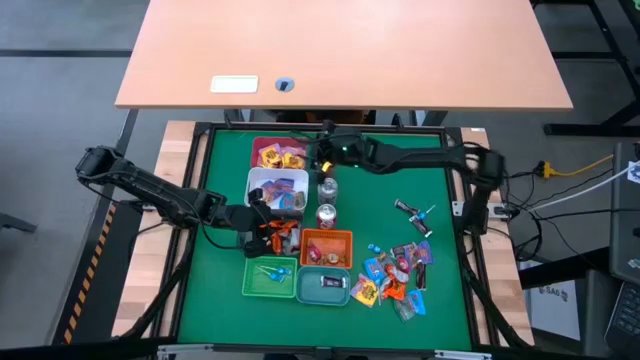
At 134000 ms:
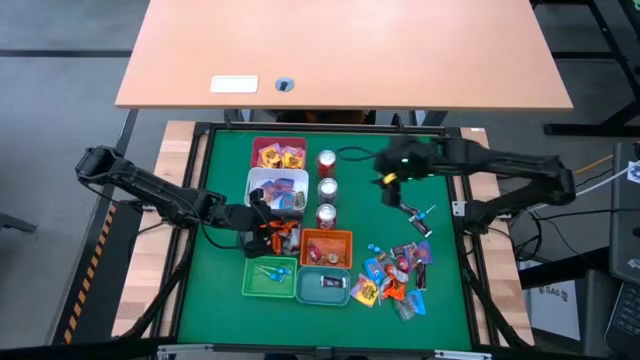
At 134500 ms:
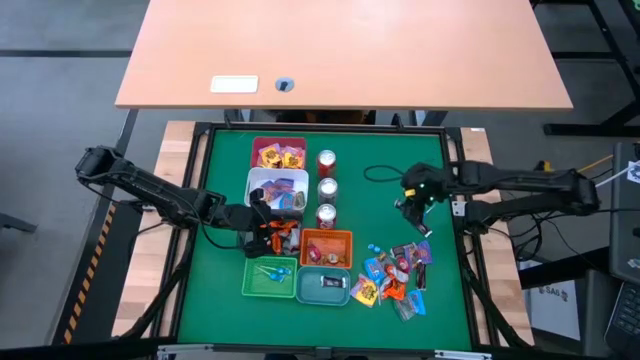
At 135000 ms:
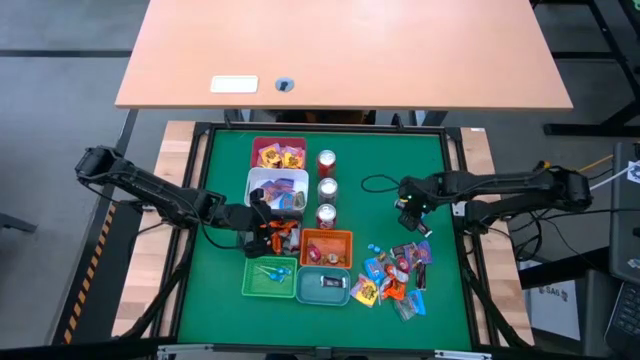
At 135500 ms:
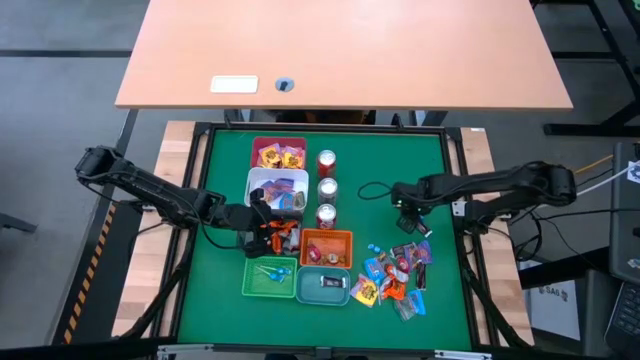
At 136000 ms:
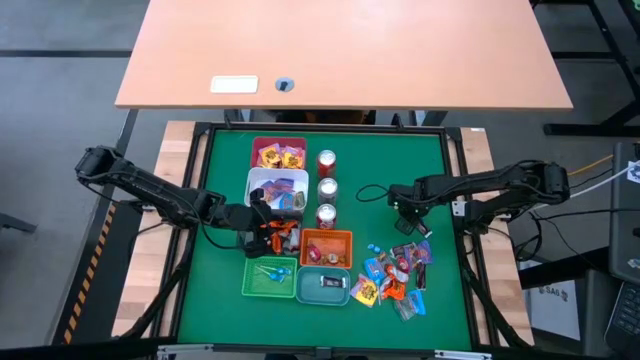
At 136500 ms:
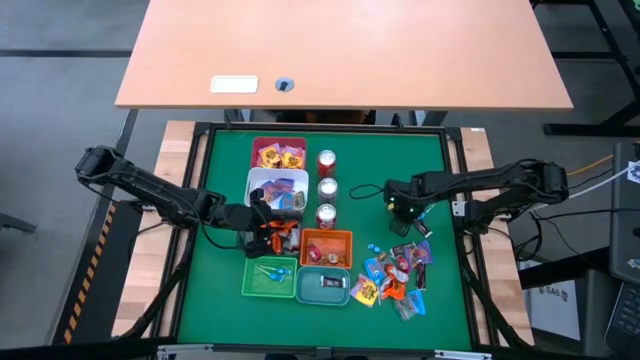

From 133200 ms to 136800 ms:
Task: Sort candy
Put the brown candy into the teal green bin

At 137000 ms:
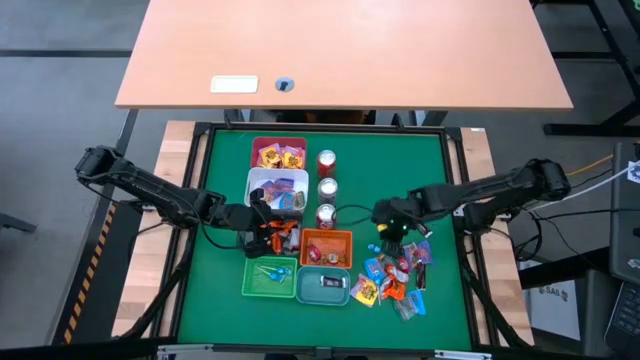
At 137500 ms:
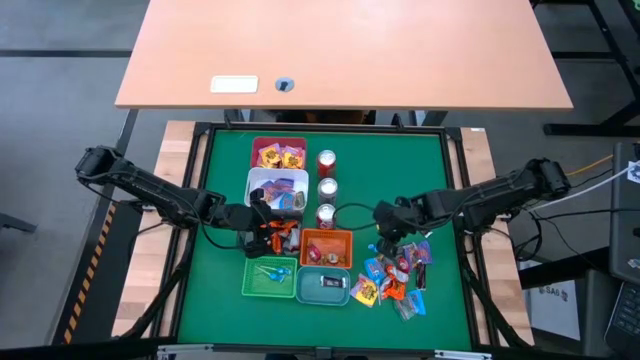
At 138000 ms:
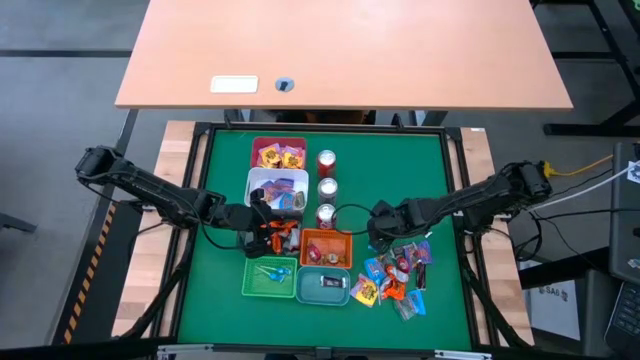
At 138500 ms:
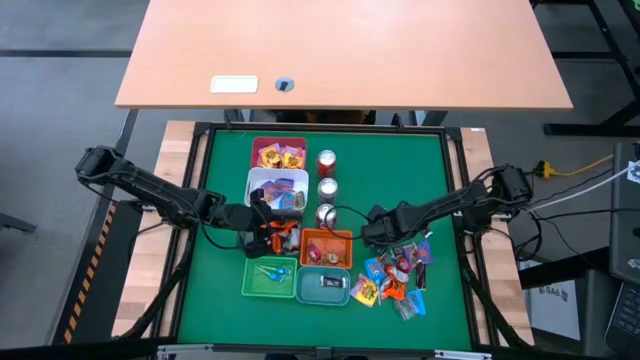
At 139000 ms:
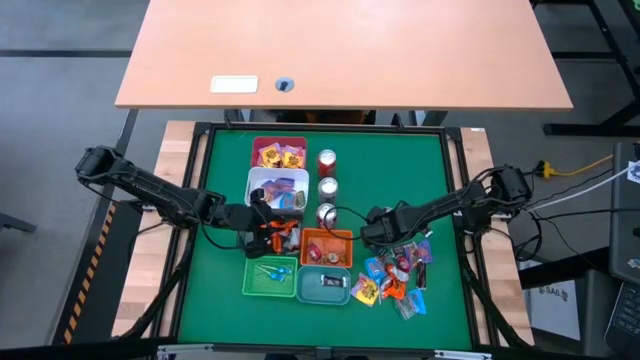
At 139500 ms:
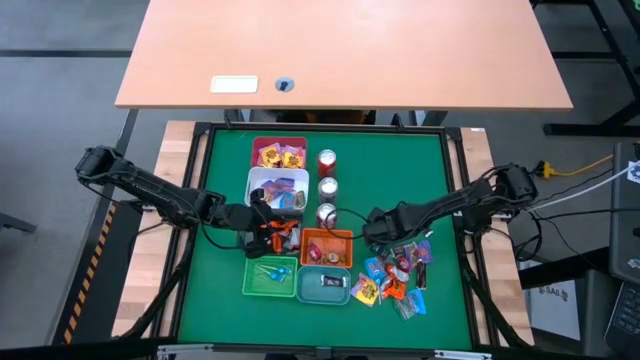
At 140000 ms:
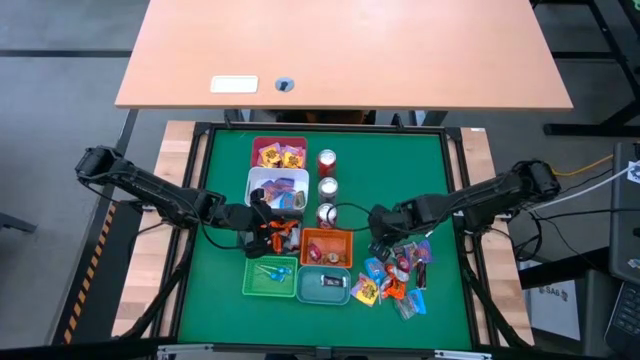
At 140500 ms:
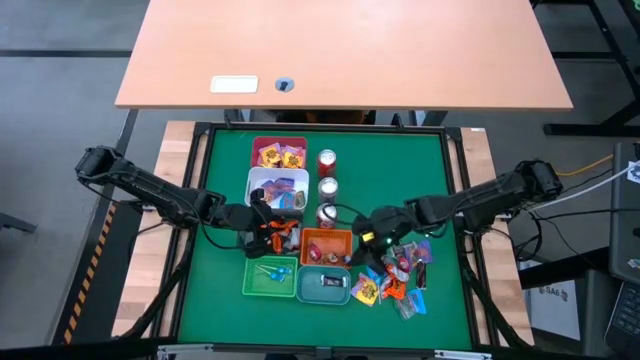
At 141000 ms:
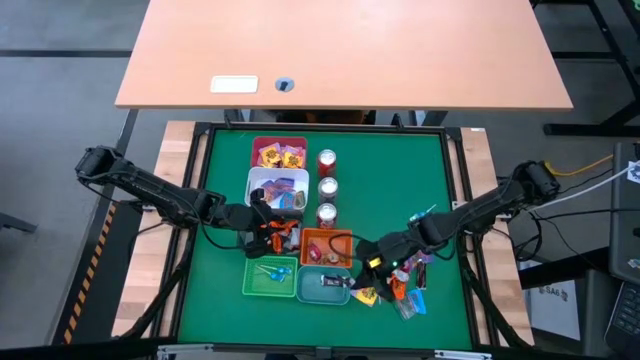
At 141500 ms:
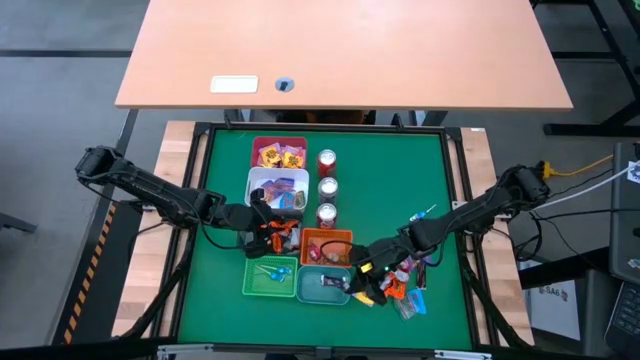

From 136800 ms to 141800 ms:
Put the brown candy into the teal green bin

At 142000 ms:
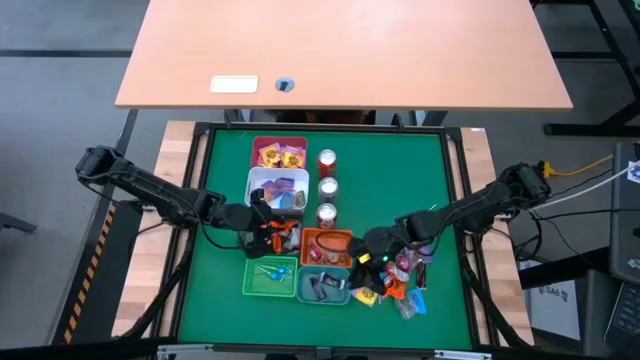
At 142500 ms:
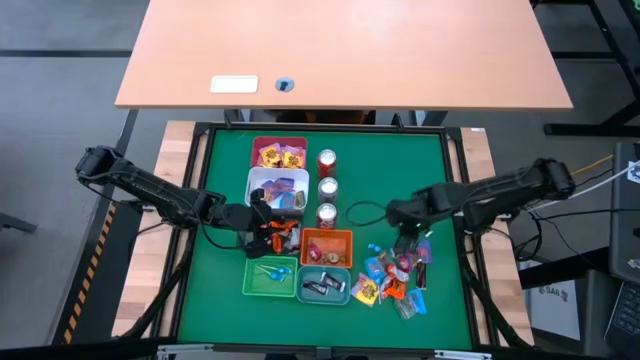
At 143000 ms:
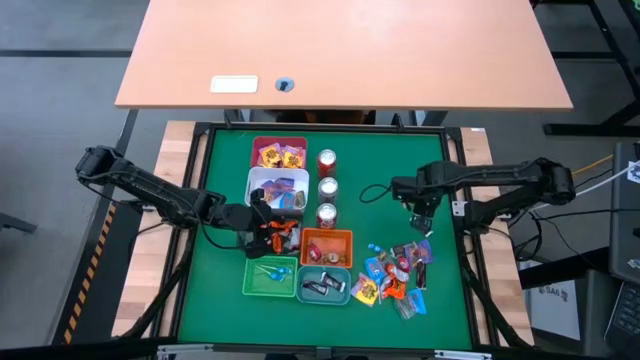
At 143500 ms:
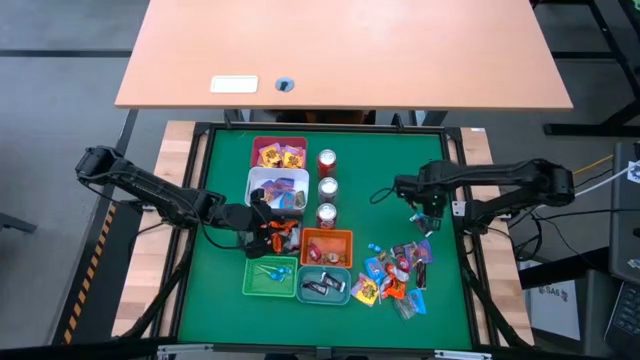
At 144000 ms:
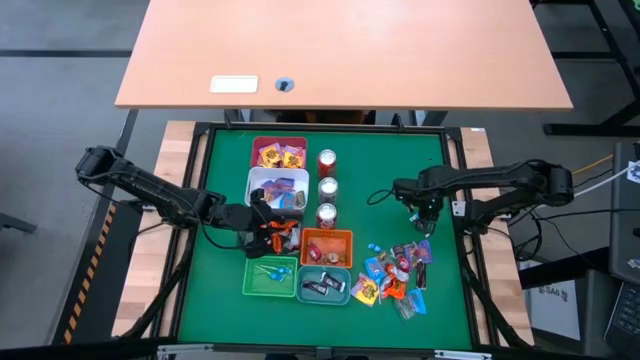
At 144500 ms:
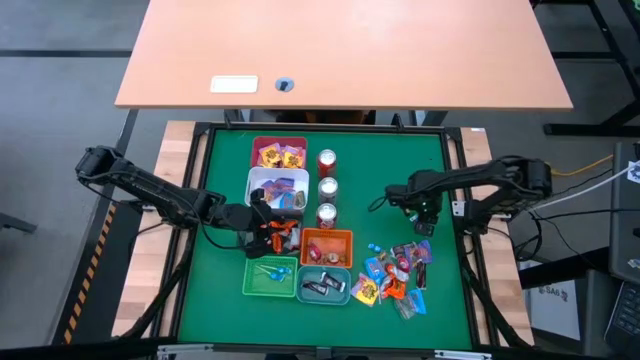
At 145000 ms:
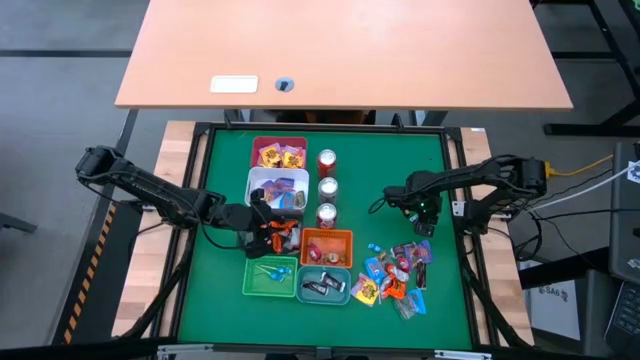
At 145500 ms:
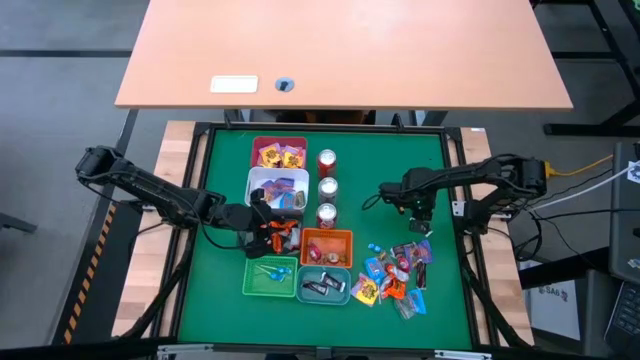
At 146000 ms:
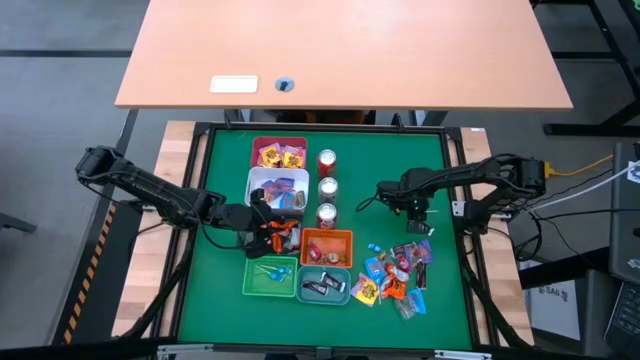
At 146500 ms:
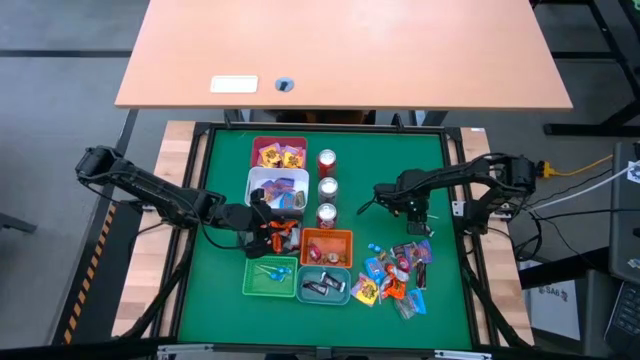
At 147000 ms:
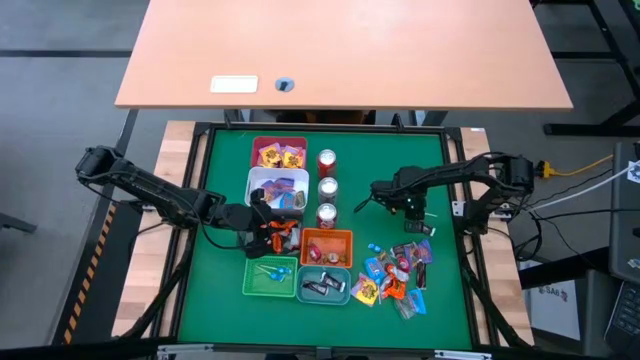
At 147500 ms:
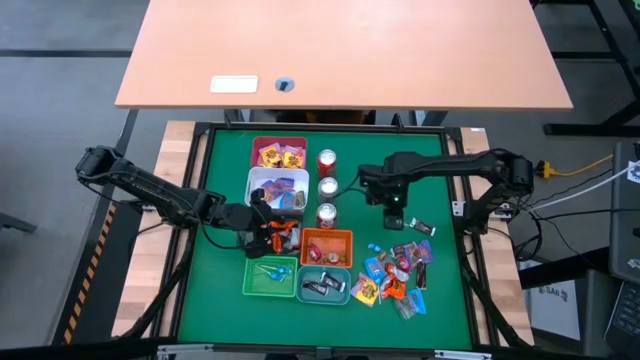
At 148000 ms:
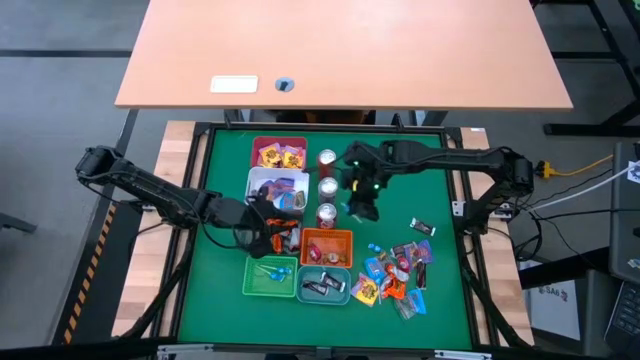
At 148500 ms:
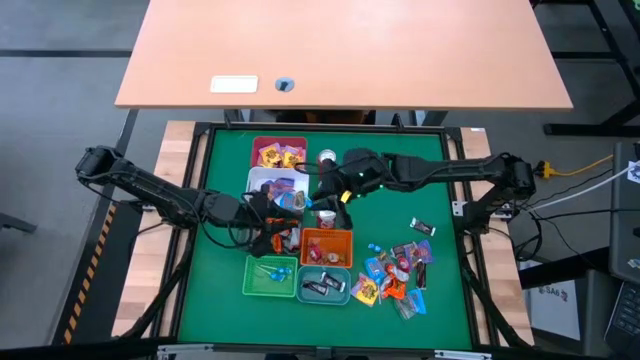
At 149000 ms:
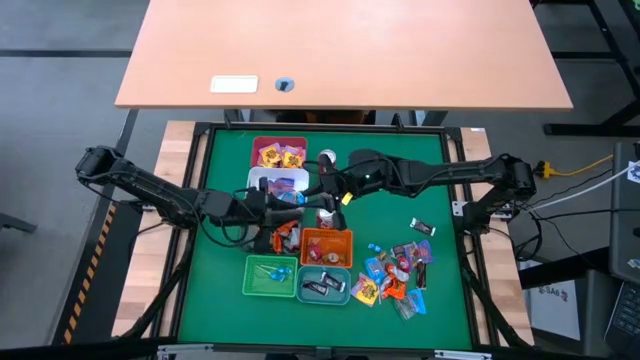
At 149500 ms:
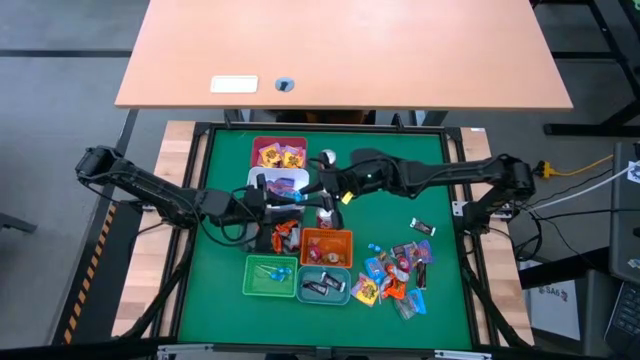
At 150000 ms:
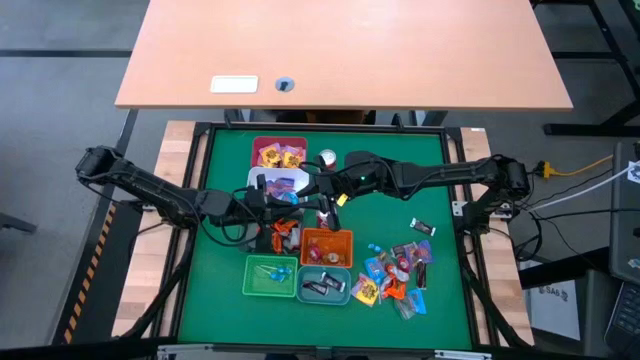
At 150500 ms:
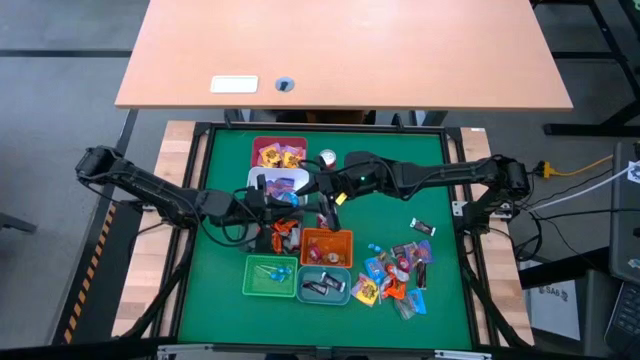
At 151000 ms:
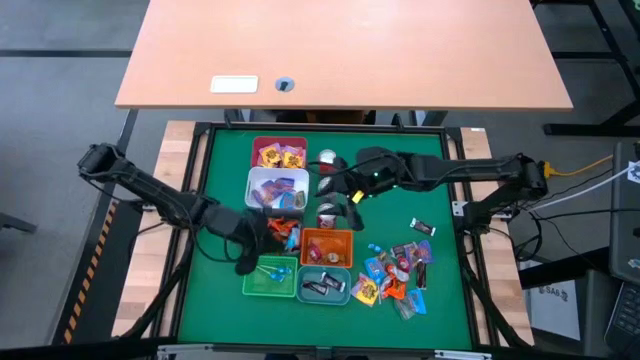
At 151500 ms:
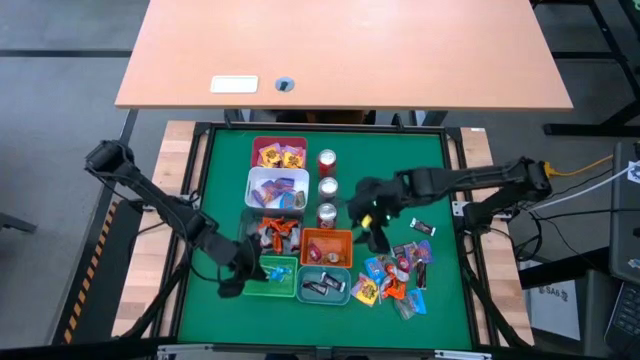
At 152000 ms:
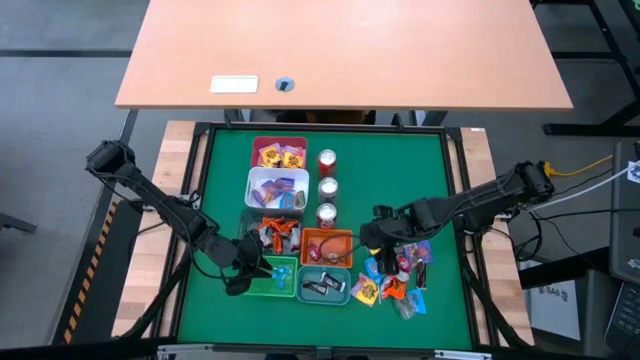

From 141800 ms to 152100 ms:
Put the blue candy into the green bin

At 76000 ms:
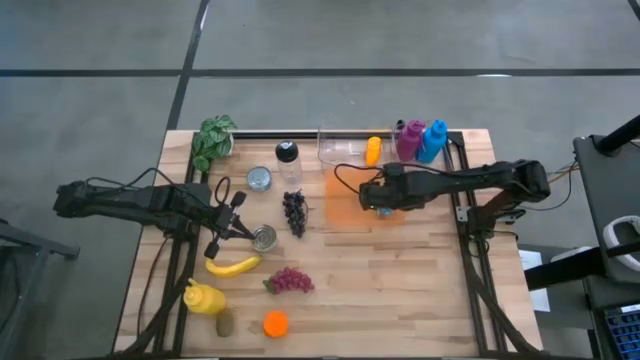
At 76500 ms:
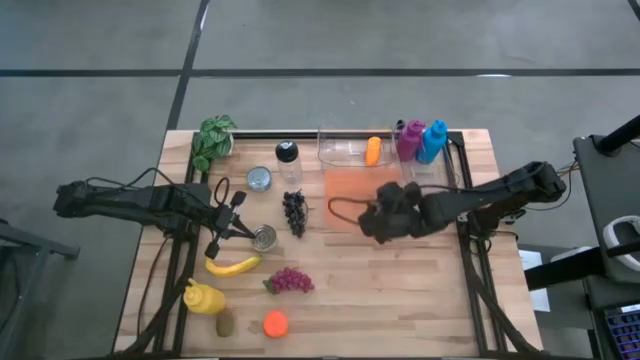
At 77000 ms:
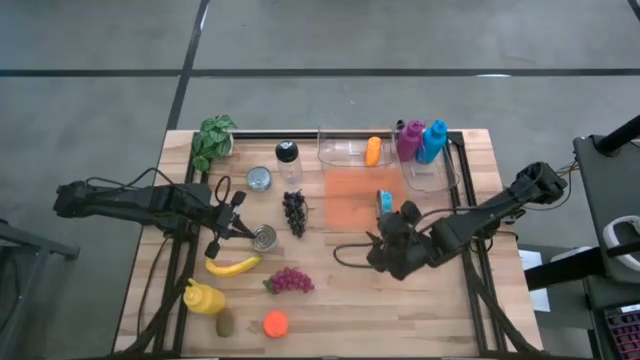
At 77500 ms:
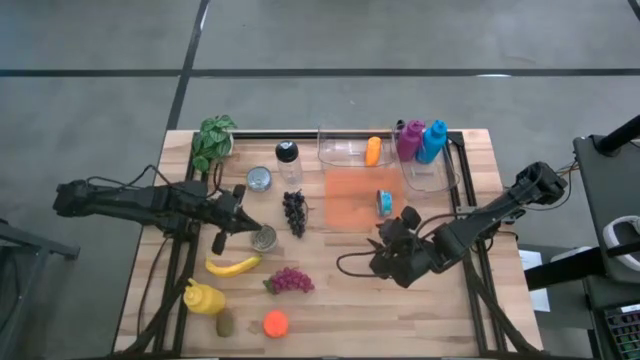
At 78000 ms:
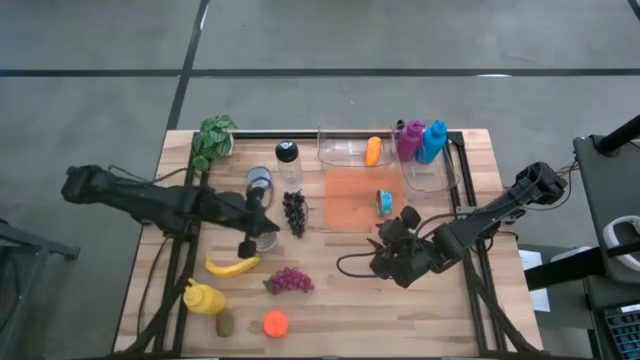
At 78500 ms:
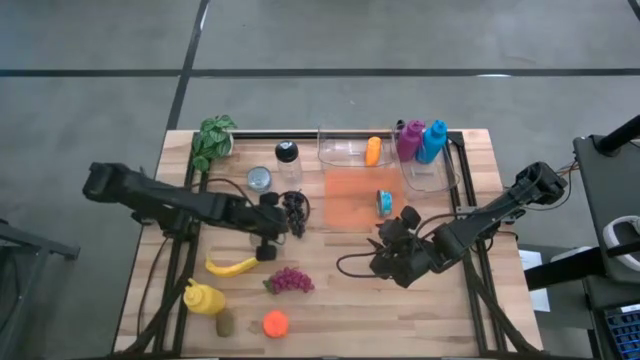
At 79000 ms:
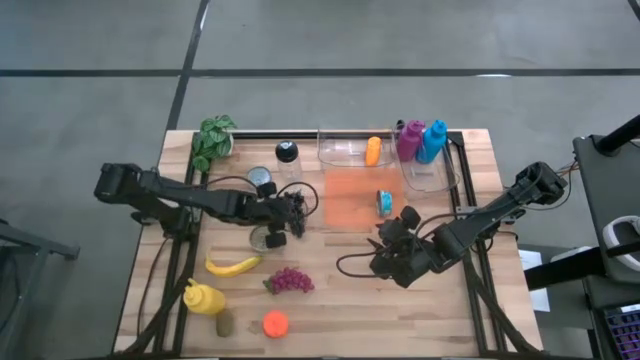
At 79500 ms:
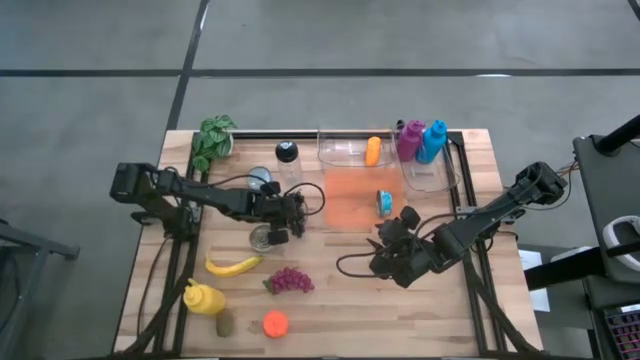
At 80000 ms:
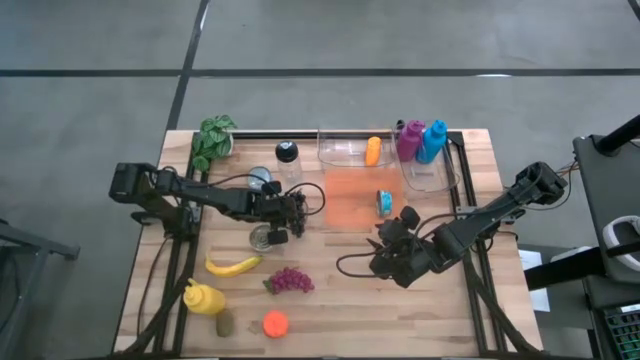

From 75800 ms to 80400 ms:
Task: Pick & Place Food Item
Put the dark violet grapes into the left transparent bin
